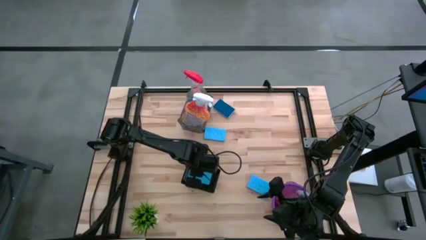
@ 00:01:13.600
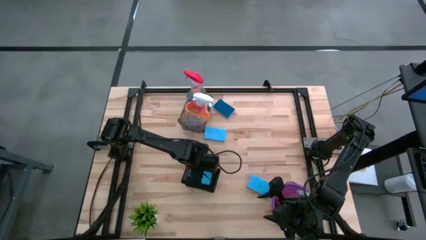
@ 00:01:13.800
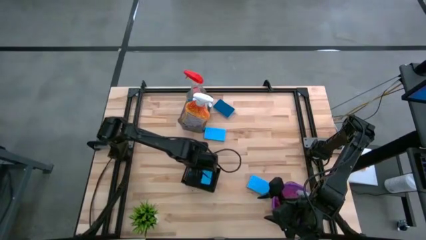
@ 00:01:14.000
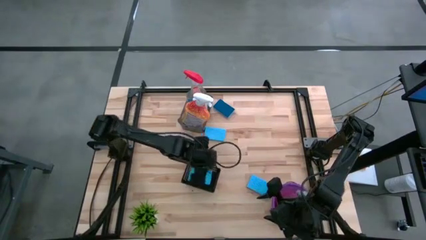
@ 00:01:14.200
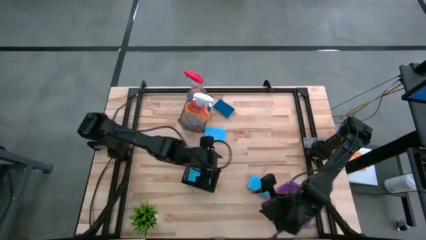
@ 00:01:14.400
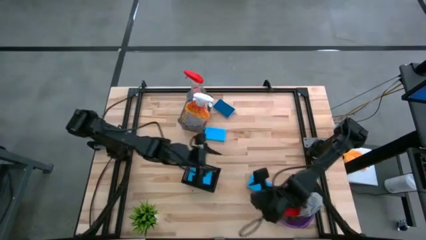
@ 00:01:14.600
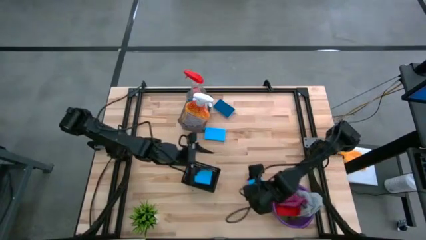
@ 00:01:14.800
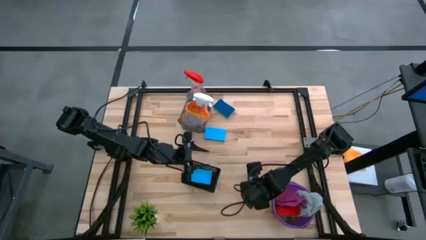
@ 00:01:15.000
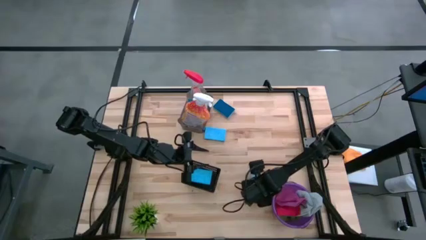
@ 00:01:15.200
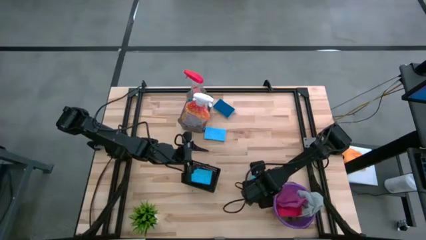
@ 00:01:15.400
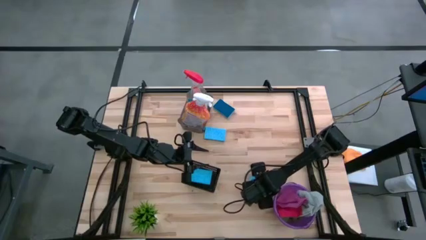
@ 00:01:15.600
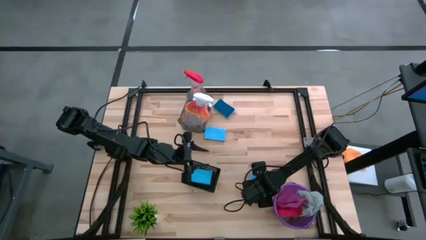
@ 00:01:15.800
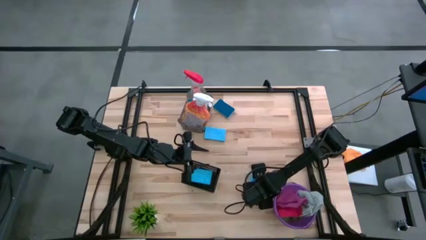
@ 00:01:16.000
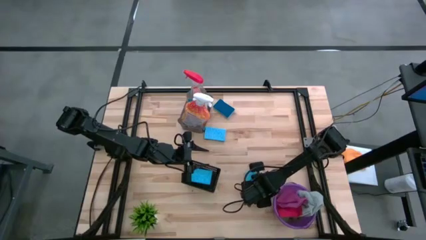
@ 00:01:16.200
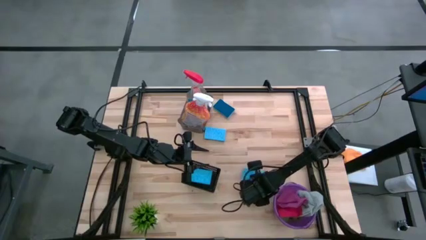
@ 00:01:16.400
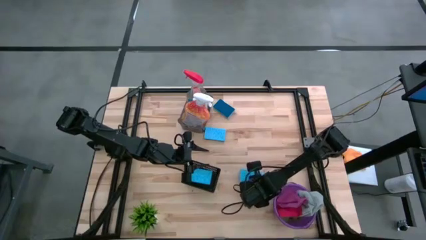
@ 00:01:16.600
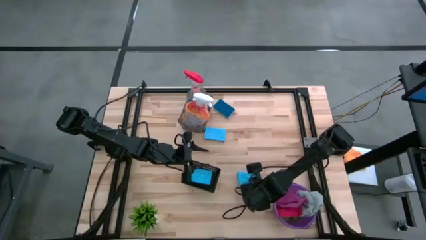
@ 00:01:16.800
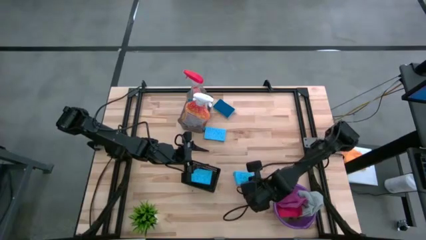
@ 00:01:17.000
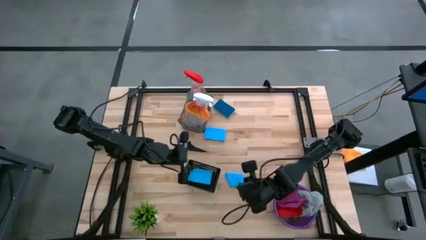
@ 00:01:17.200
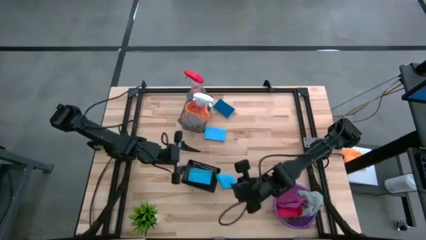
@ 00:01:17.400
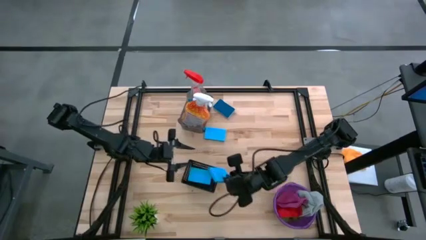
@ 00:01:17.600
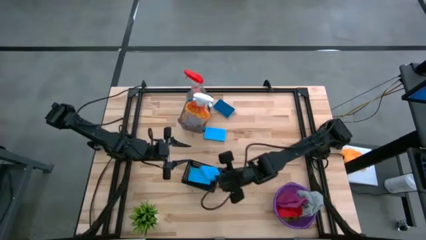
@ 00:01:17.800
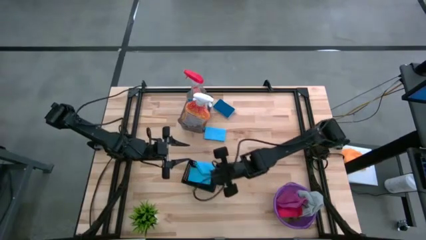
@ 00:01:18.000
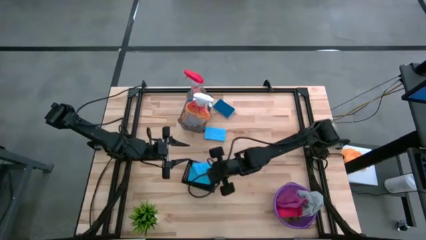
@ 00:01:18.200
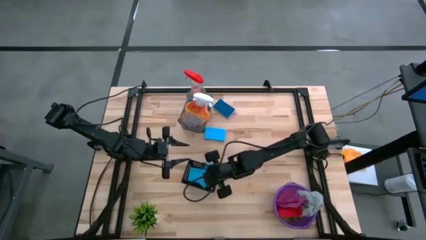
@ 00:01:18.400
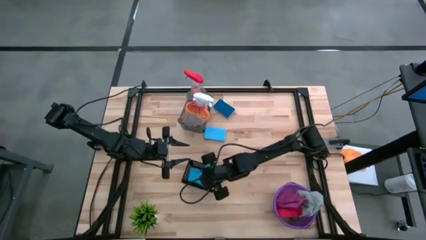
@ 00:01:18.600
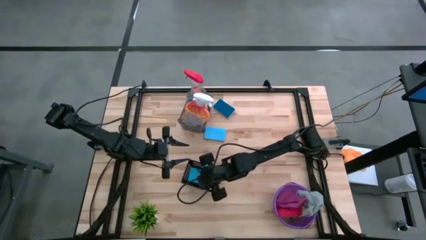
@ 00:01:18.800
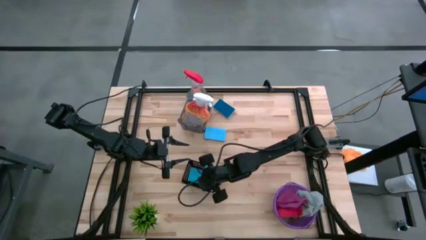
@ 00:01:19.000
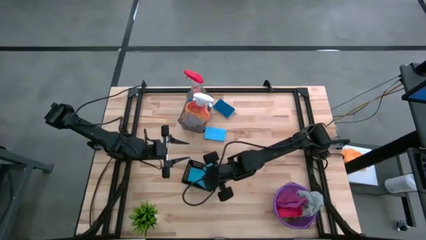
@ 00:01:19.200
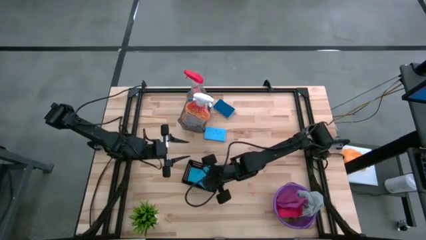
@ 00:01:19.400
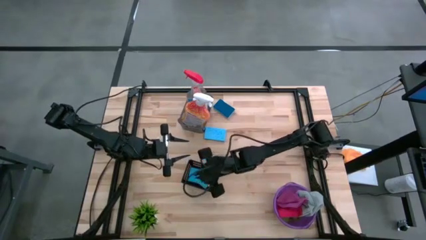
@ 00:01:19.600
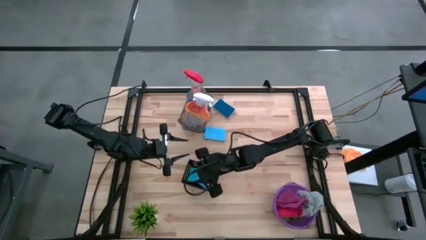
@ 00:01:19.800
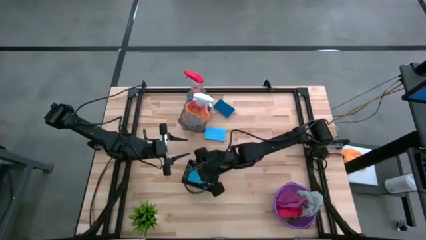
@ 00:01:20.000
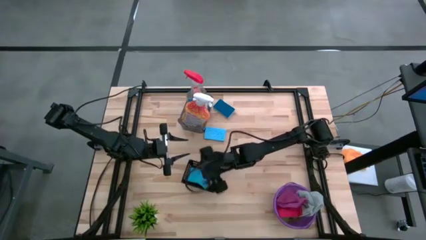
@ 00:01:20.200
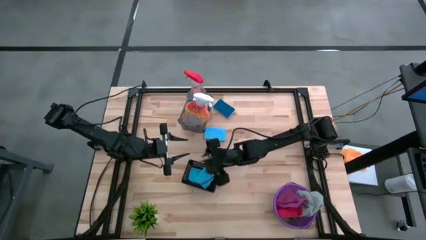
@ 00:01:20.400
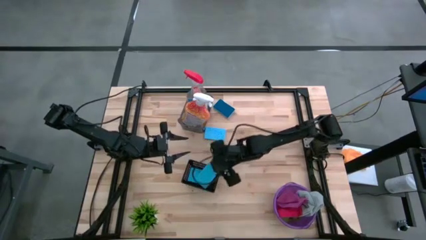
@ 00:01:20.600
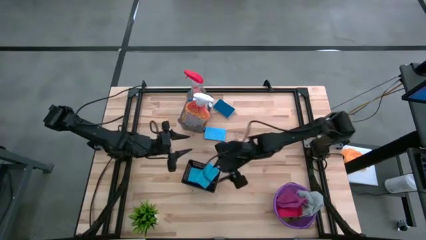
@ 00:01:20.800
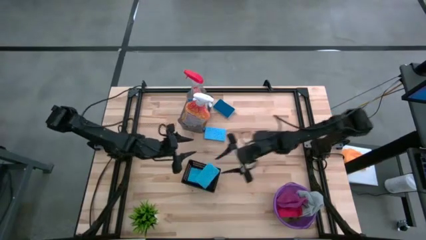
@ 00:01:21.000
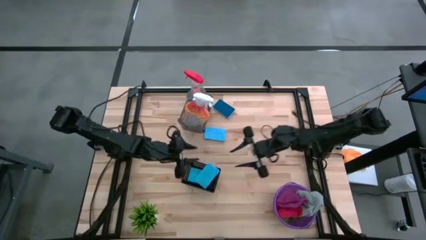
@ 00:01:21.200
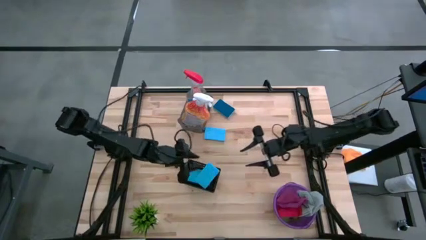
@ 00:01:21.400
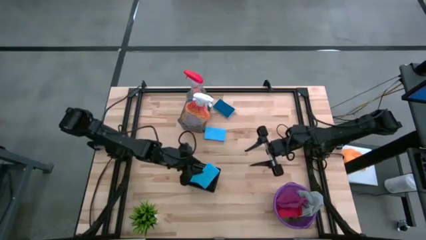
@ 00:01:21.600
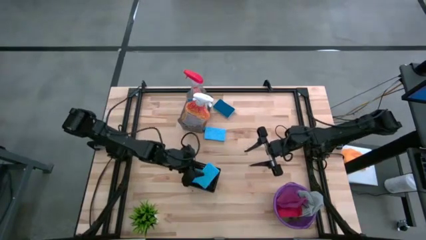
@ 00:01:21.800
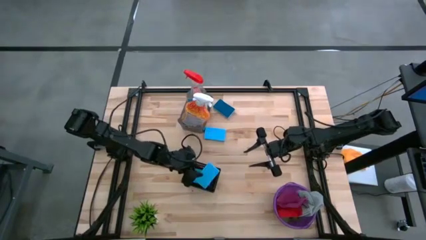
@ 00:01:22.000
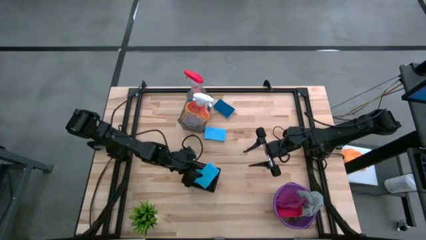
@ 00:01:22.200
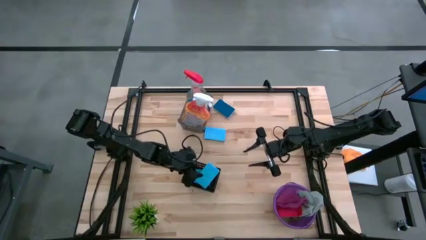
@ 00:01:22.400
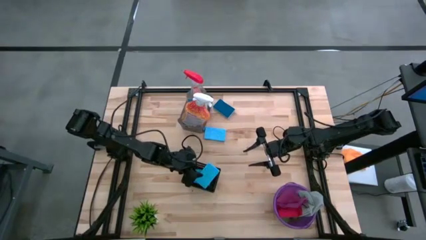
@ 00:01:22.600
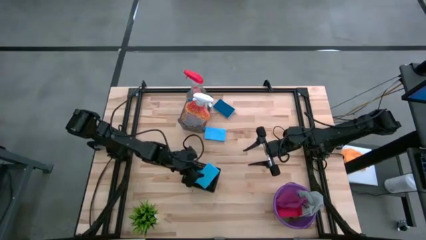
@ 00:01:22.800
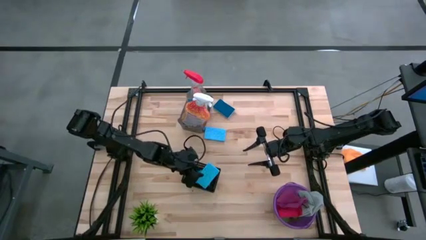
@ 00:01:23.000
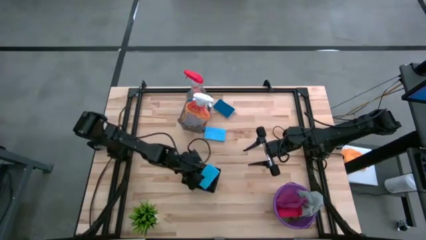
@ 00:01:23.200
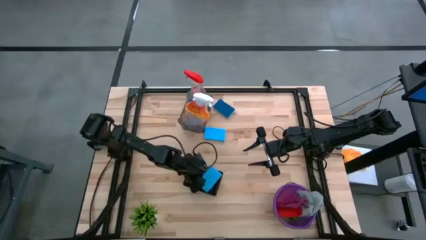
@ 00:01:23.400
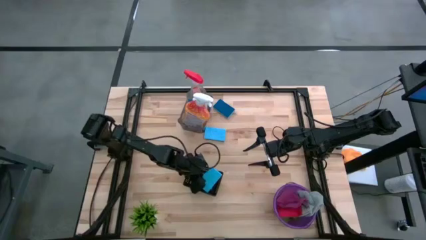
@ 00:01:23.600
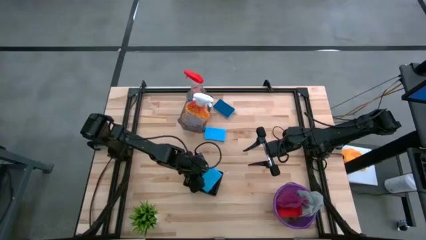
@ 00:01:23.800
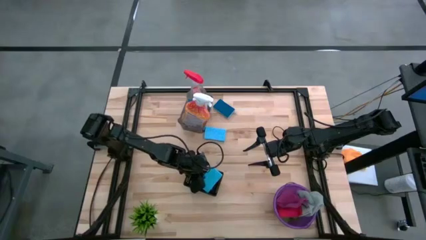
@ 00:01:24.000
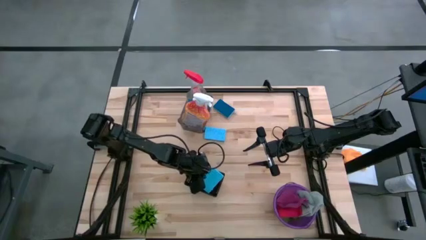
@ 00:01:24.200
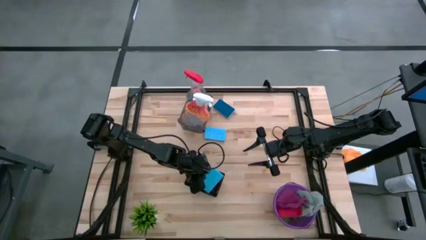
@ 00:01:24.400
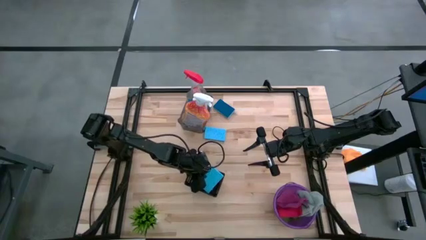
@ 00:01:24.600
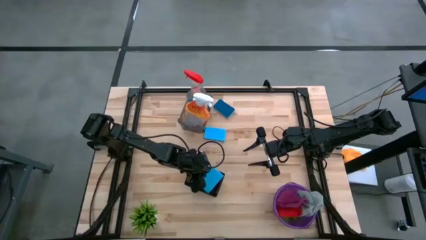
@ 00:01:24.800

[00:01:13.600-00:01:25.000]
Task: Pick & Place Kitchen Items
Put the blue sponge into the black bin

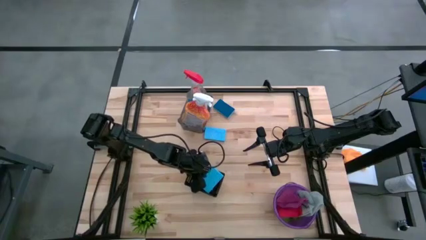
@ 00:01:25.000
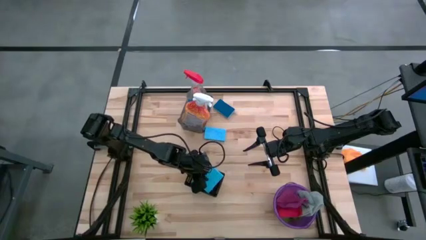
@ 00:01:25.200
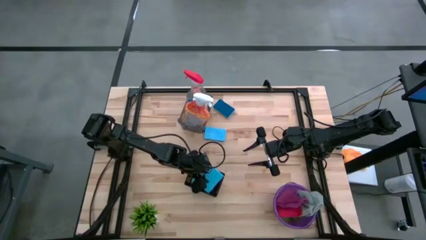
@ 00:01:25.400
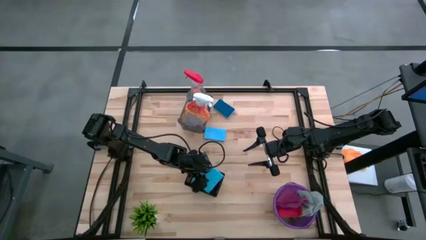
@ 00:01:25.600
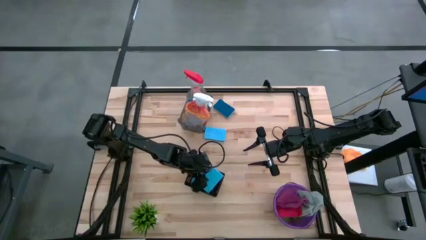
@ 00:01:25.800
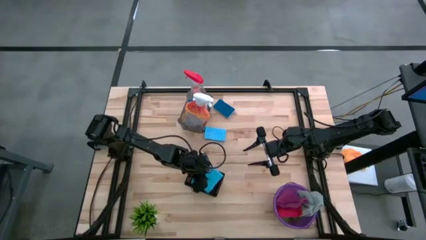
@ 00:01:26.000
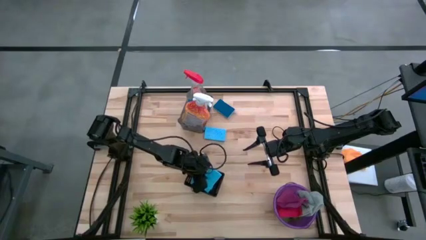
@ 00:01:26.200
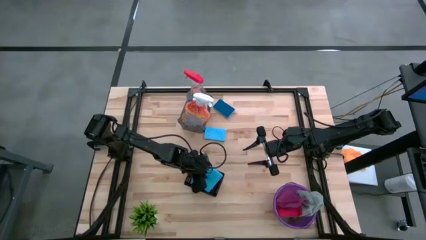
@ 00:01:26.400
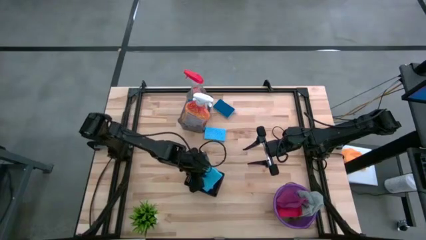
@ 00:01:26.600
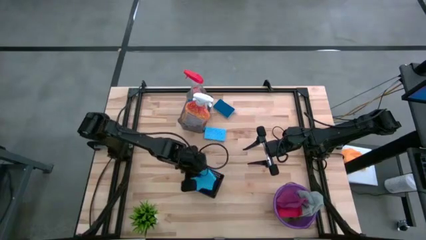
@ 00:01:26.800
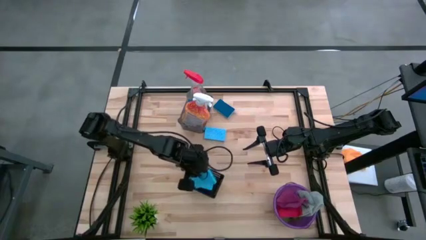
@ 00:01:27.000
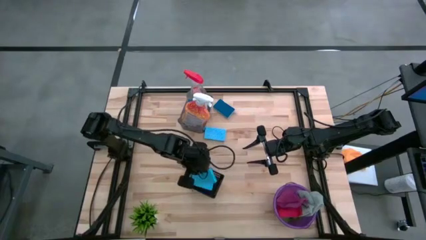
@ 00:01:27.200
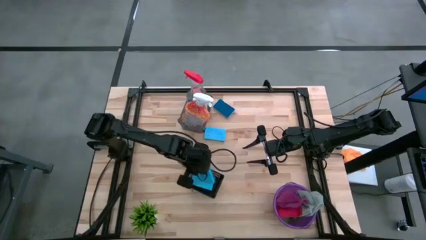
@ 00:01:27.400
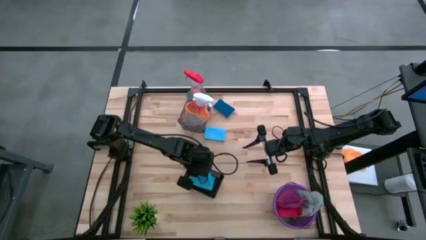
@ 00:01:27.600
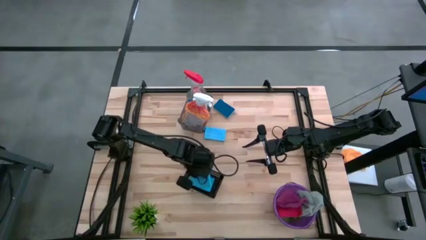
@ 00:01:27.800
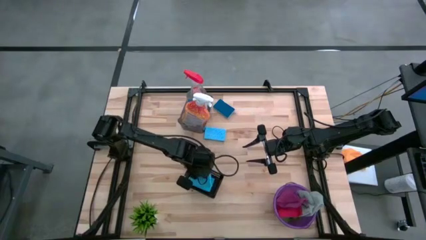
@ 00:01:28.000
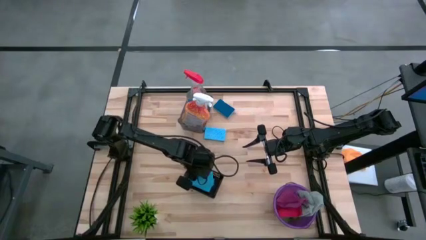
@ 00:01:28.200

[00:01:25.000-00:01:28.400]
Put the blue sponge into the black bin

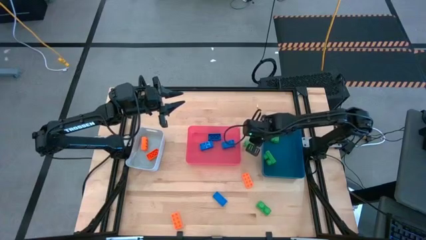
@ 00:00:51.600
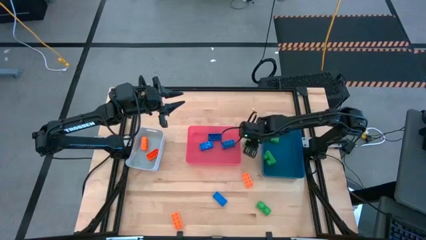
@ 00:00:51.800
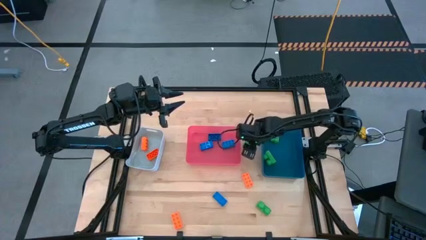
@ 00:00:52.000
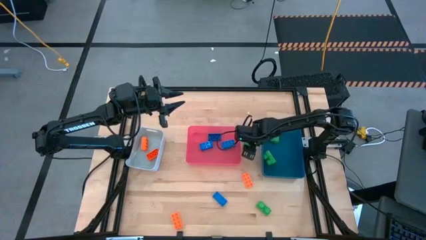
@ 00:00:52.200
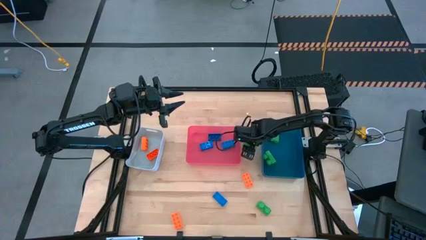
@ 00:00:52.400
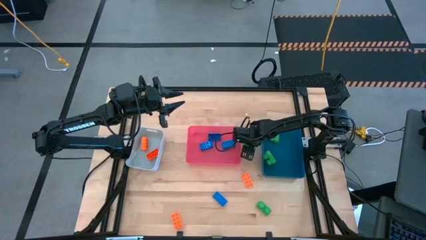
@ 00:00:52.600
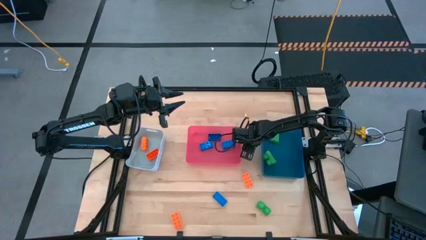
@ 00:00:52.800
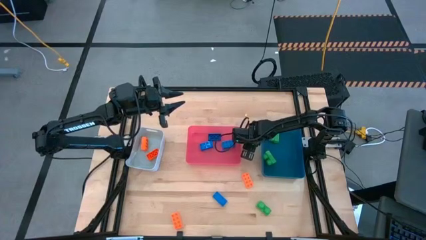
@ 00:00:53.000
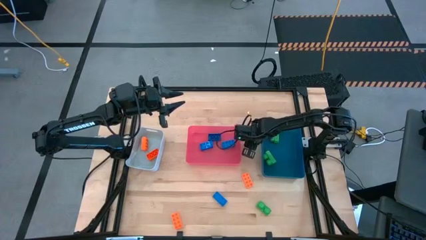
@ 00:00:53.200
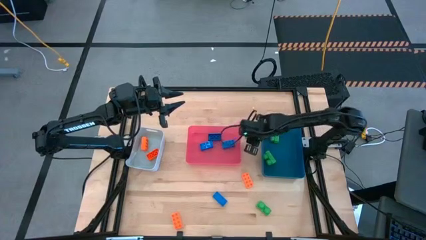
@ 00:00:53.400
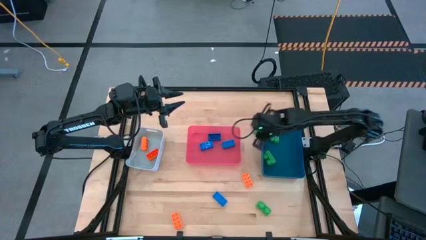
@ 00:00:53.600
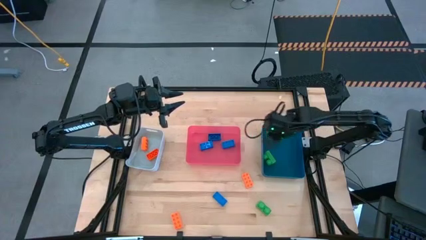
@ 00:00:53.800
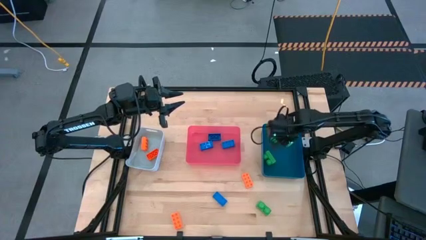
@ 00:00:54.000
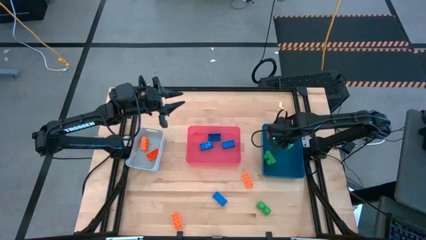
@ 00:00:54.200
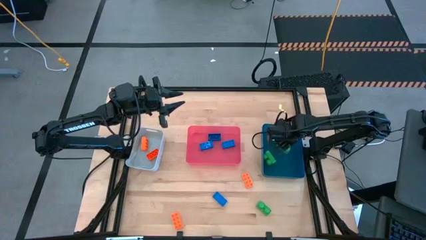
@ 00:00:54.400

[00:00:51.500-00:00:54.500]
Task: Sort & place blocks by color
Put the green game piece into the blue bin
